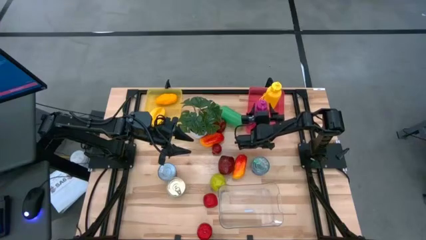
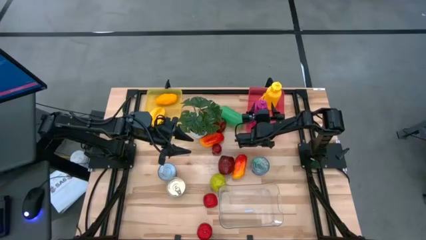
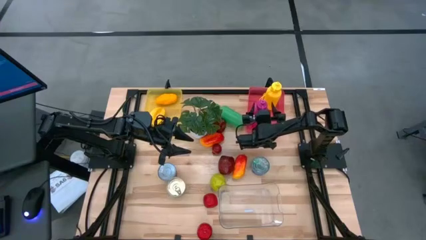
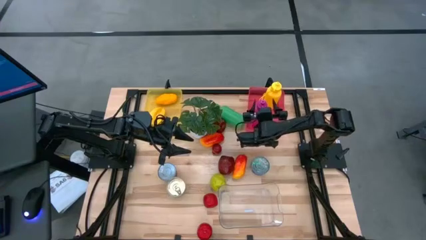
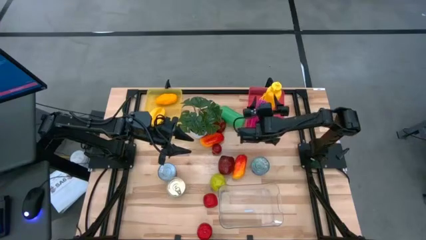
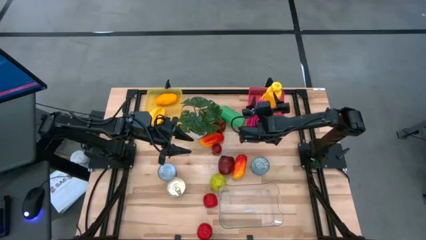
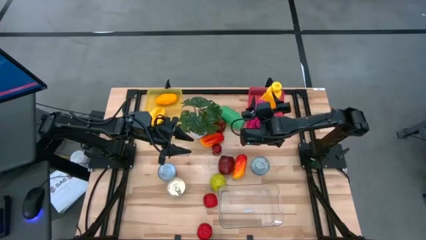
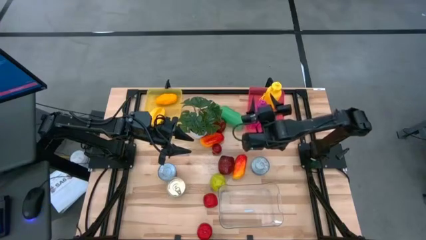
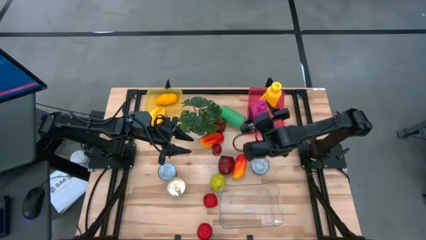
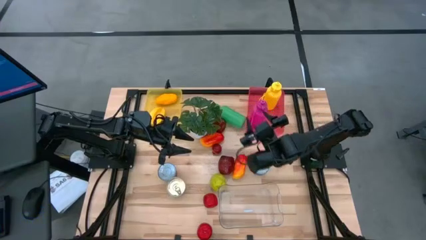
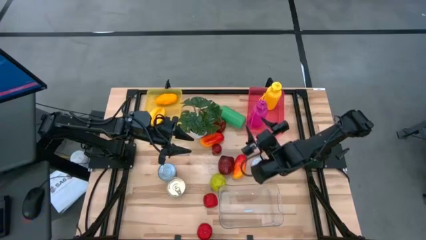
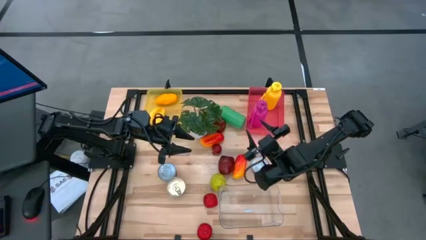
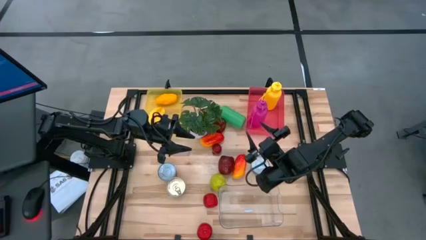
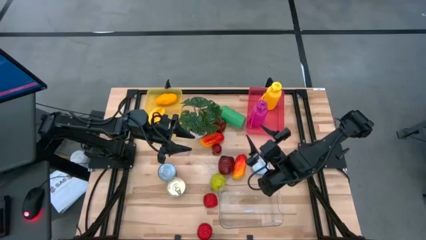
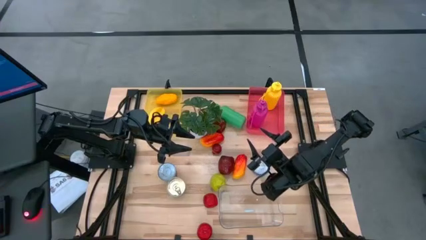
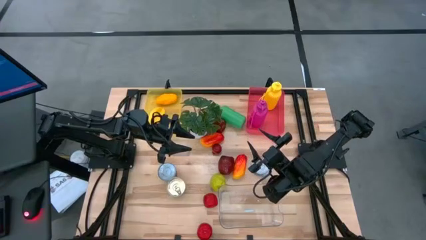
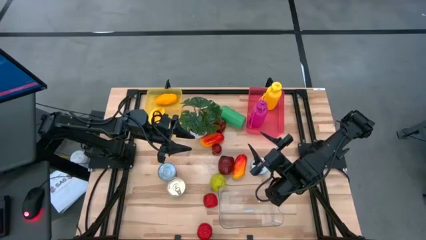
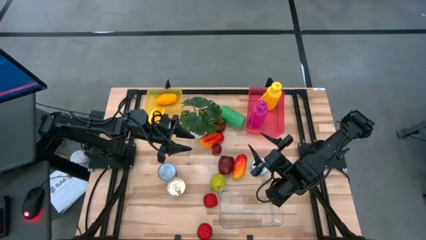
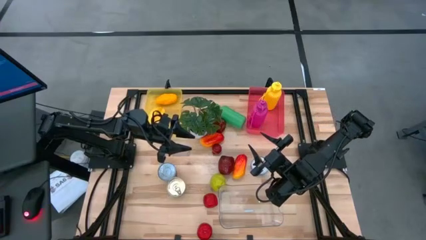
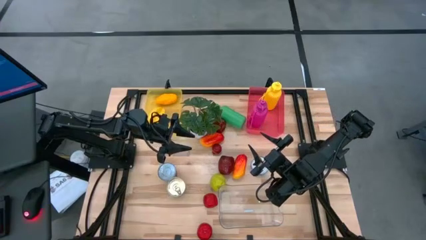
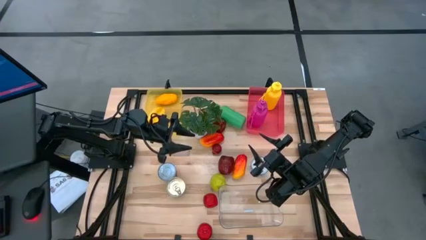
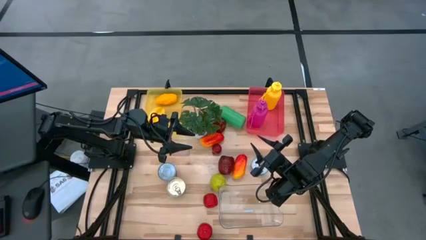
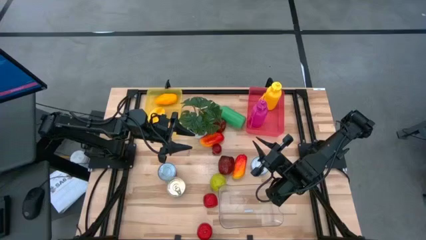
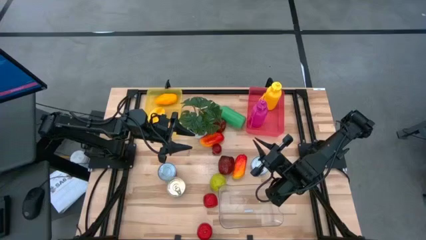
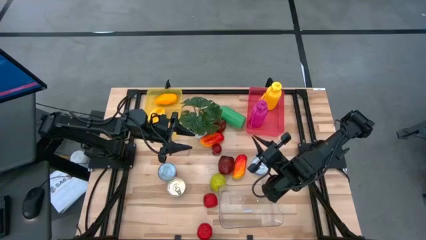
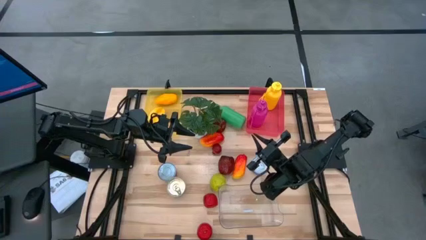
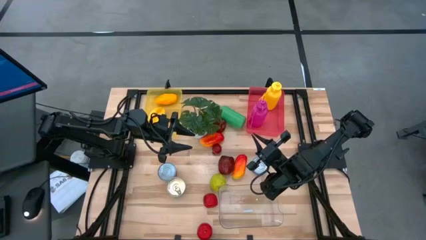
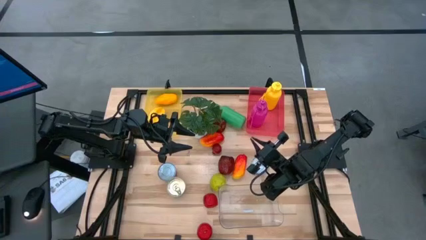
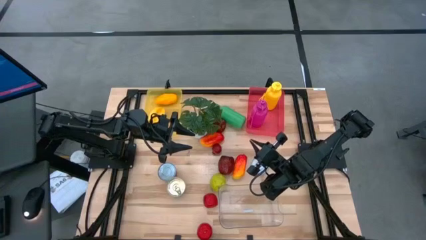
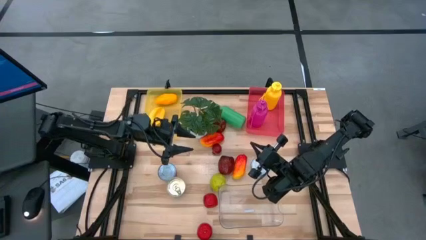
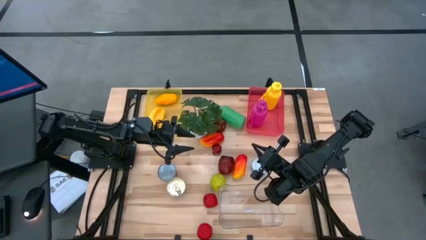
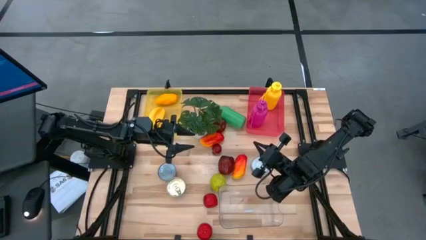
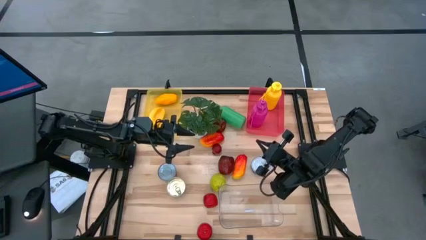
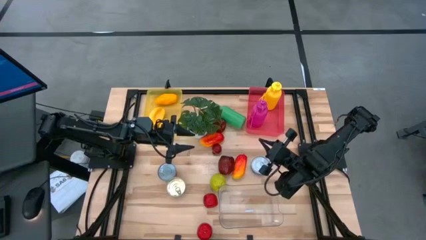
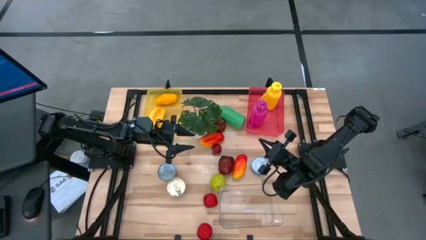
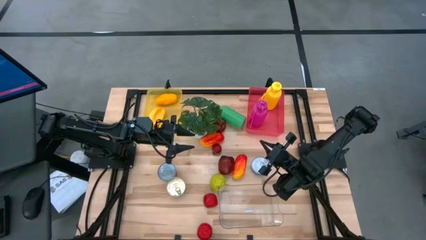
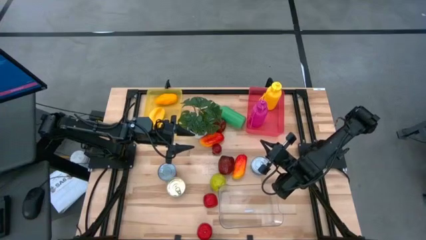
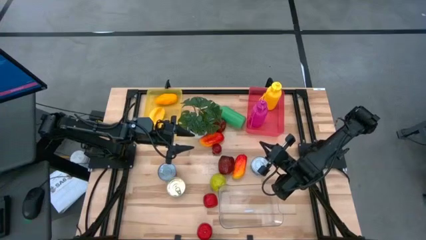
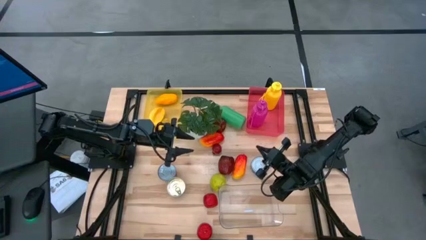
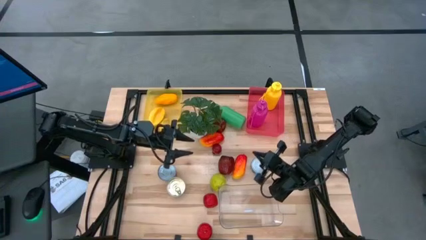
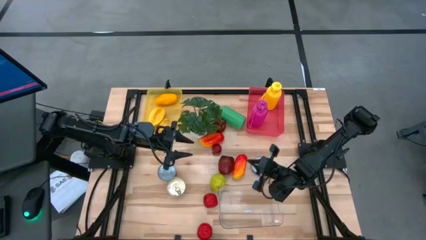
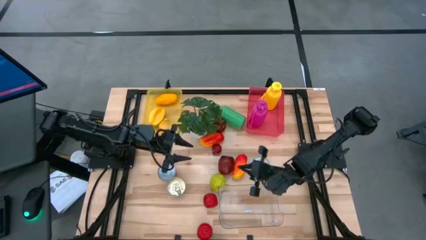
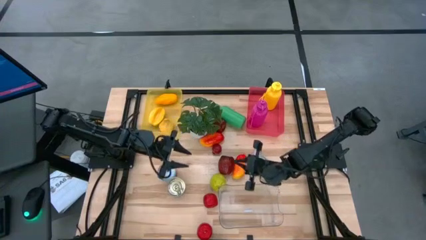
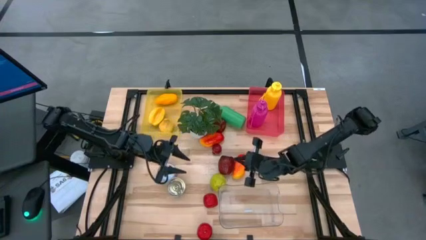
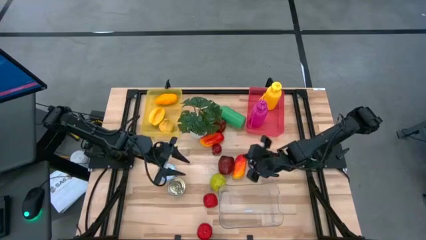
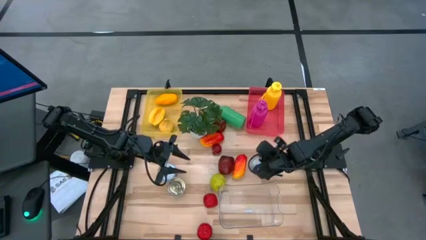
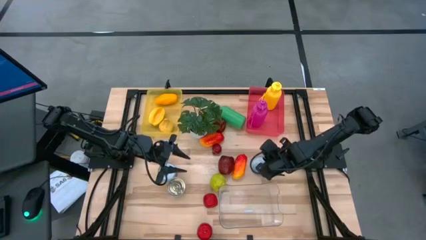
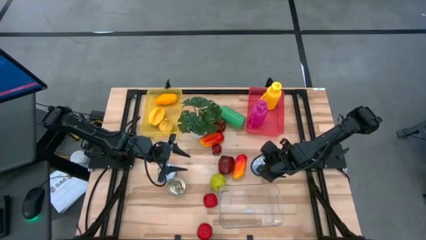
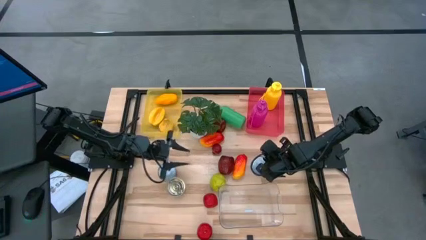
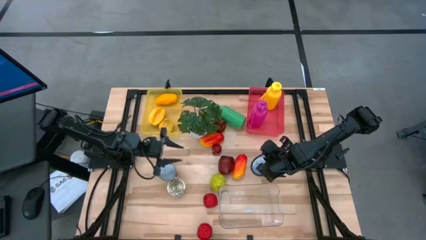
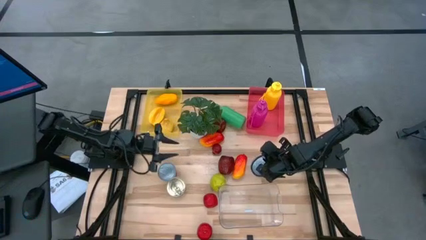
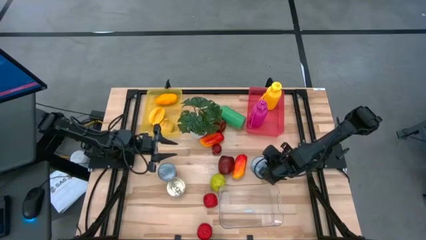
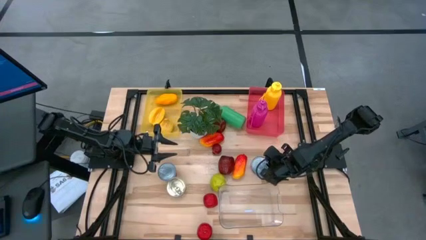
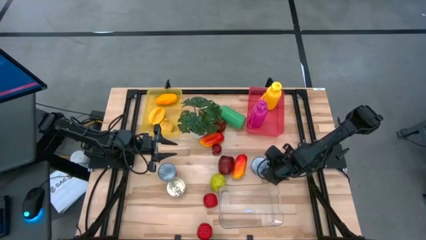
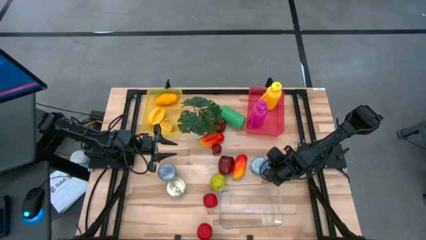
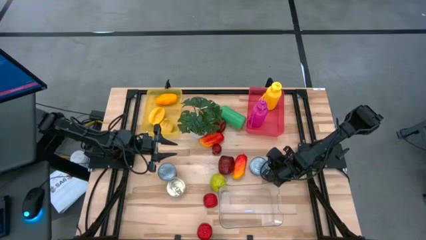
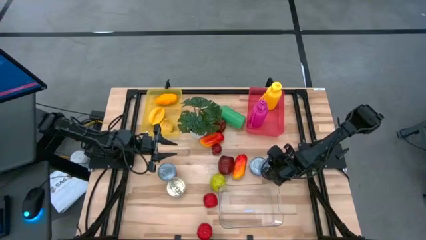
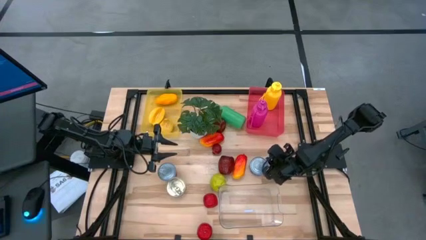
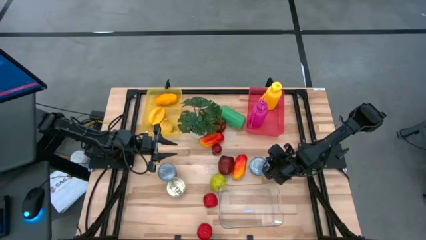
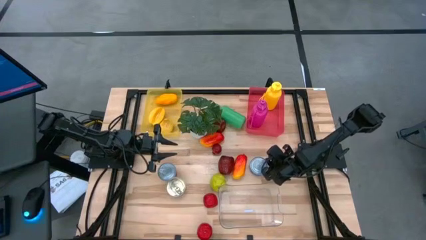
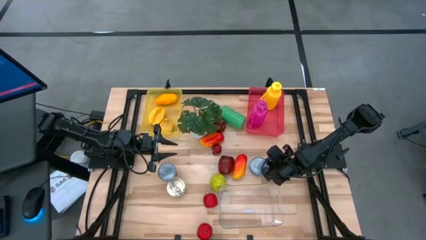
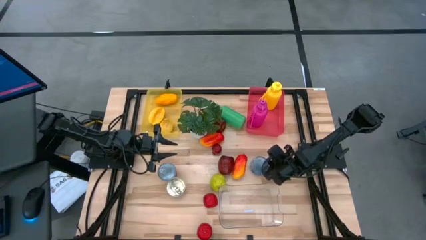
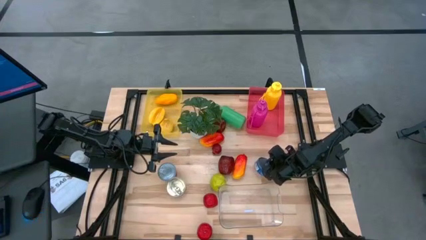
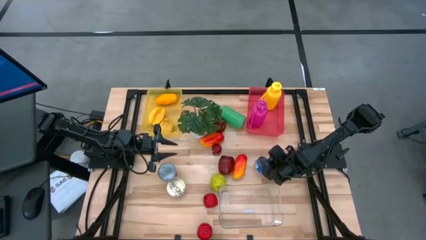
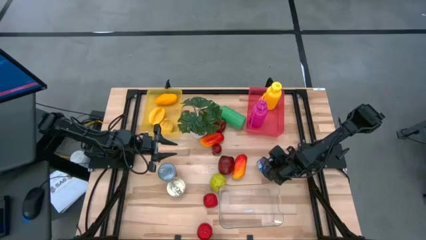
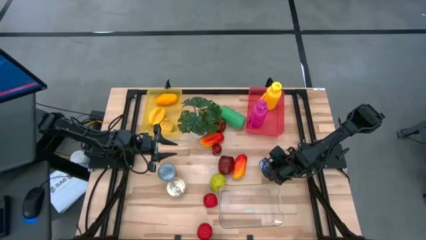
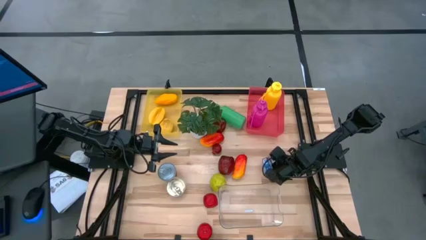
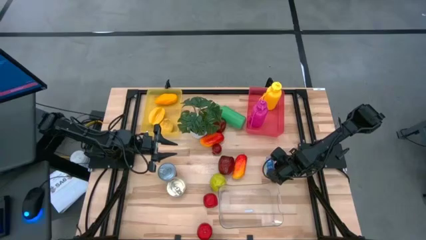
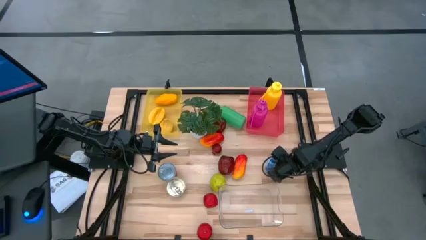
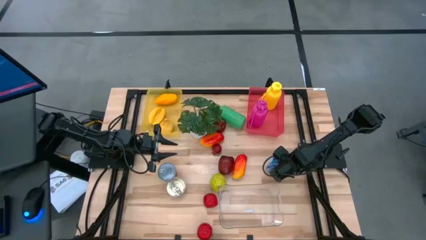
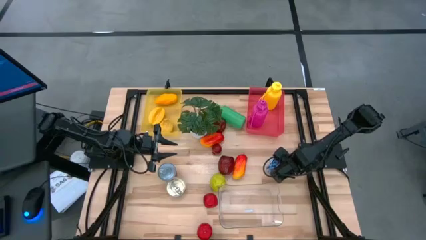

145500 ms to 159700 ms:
Task: Pick & Place Food Item
Put the blue tuna can into the transparent bin
